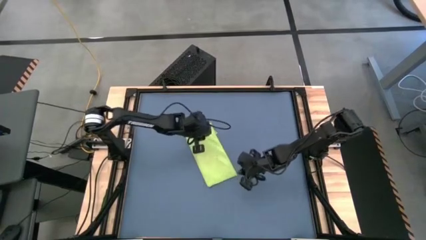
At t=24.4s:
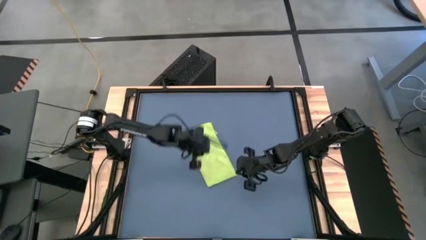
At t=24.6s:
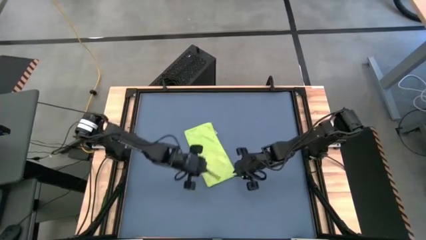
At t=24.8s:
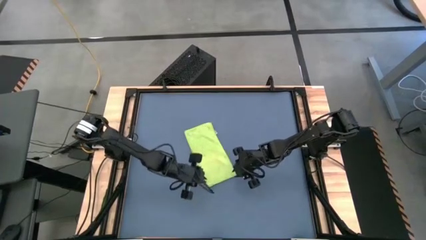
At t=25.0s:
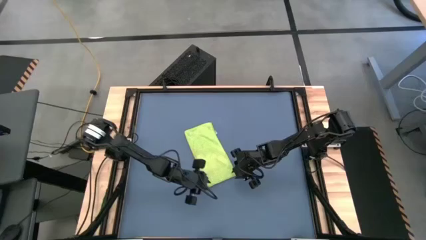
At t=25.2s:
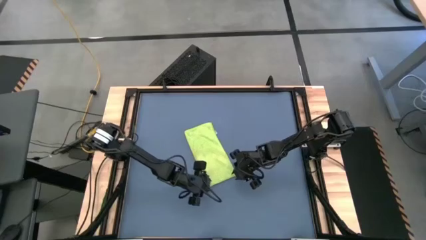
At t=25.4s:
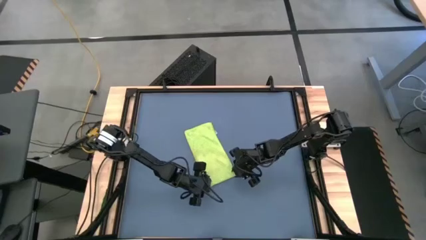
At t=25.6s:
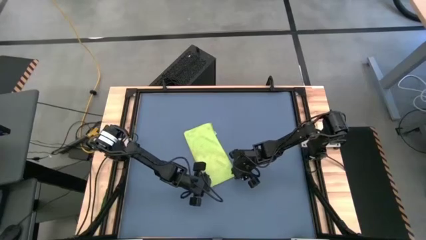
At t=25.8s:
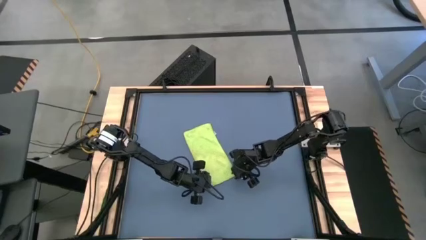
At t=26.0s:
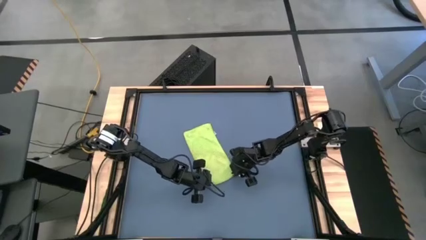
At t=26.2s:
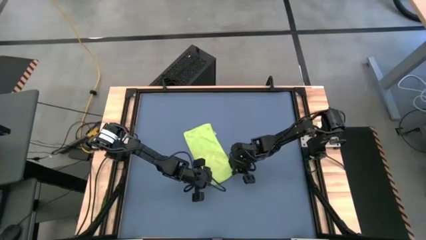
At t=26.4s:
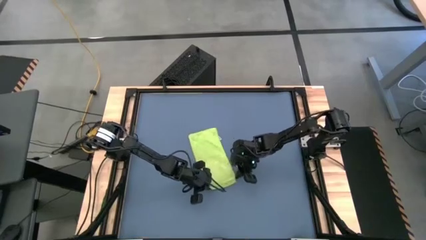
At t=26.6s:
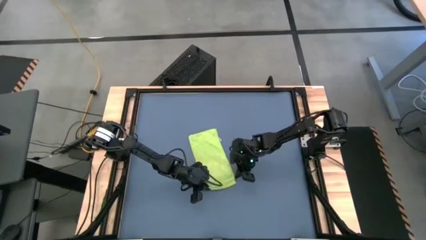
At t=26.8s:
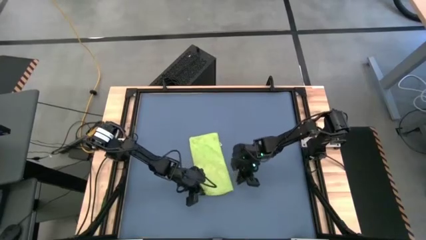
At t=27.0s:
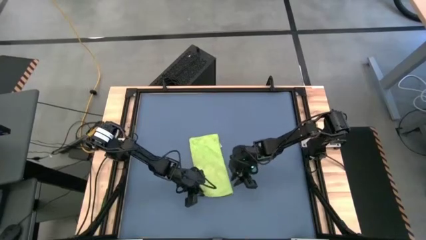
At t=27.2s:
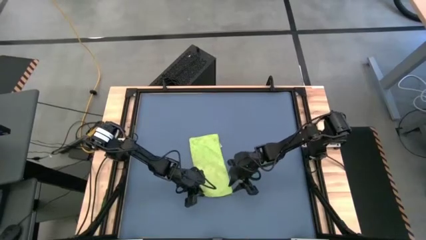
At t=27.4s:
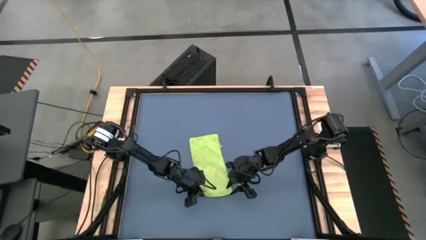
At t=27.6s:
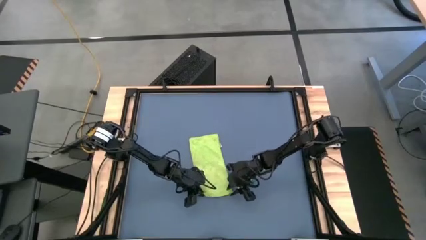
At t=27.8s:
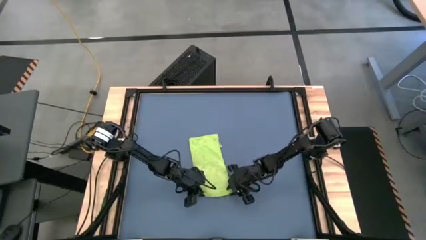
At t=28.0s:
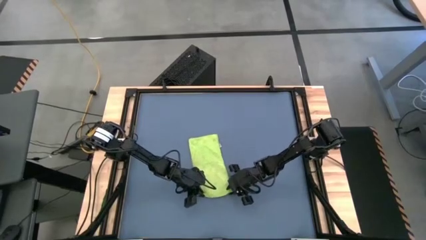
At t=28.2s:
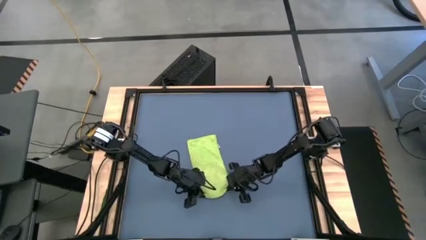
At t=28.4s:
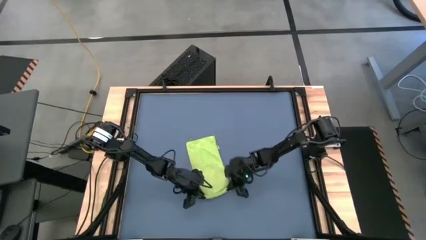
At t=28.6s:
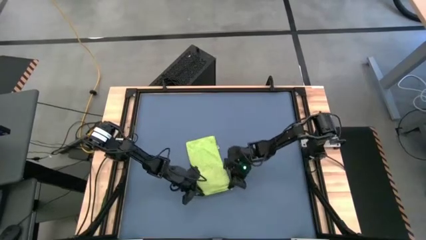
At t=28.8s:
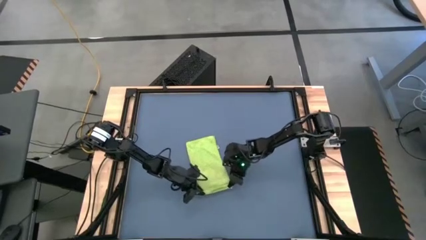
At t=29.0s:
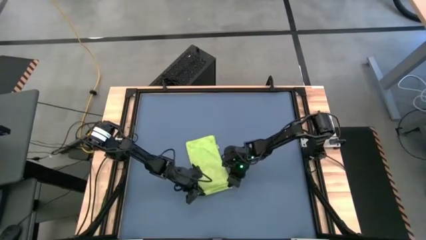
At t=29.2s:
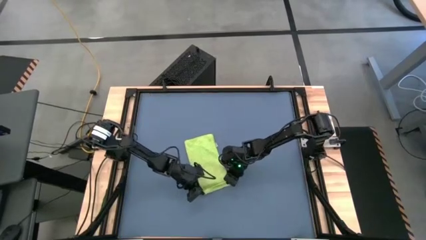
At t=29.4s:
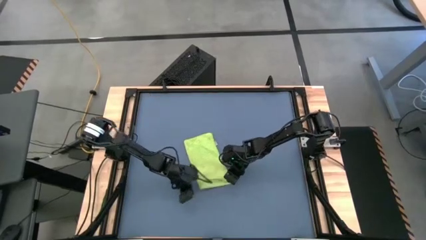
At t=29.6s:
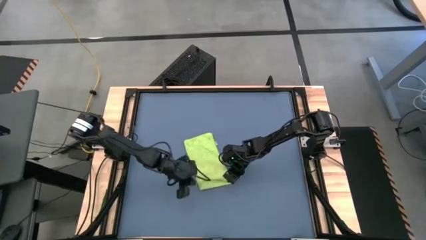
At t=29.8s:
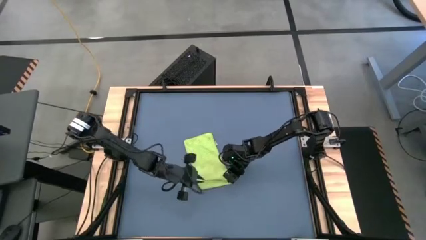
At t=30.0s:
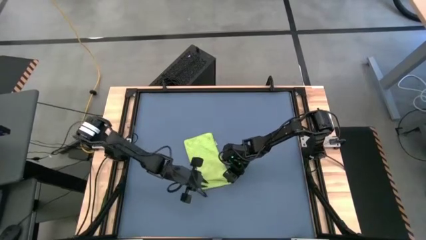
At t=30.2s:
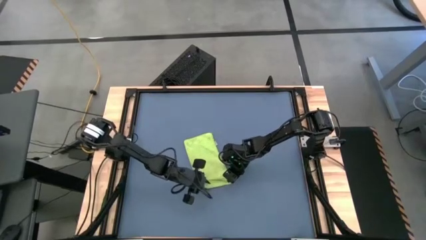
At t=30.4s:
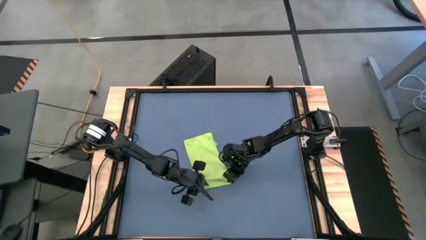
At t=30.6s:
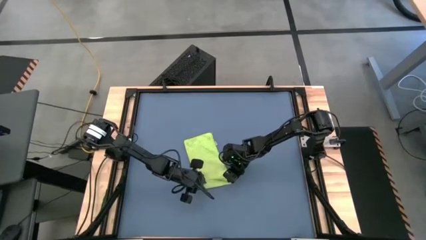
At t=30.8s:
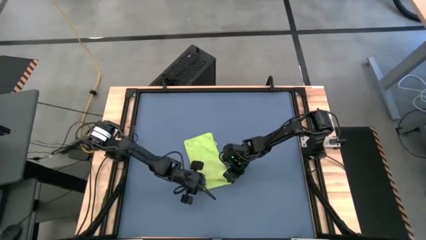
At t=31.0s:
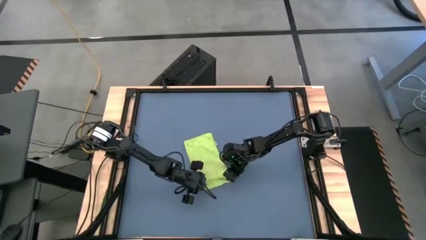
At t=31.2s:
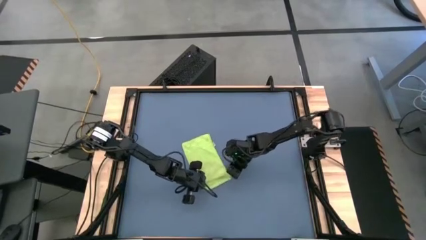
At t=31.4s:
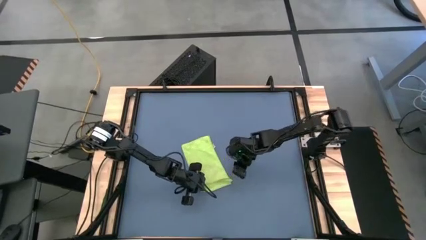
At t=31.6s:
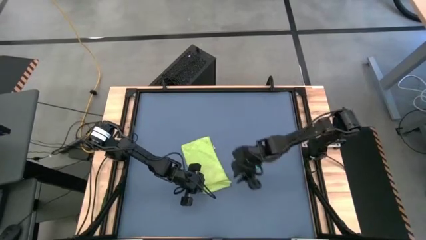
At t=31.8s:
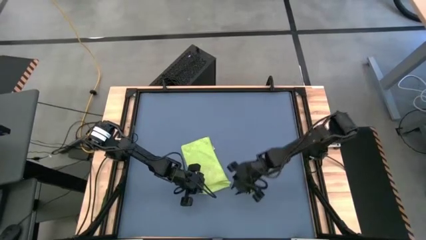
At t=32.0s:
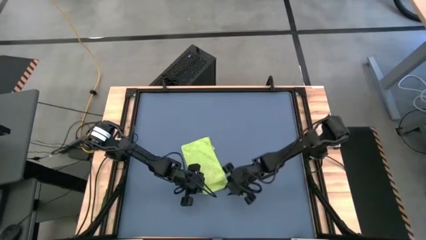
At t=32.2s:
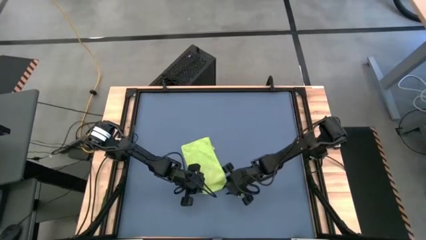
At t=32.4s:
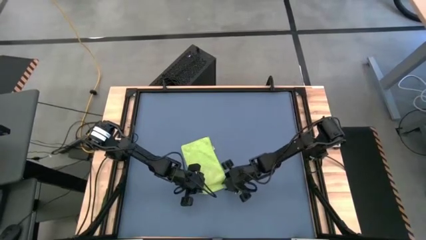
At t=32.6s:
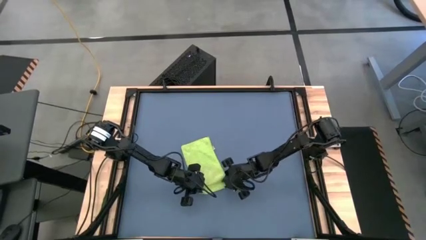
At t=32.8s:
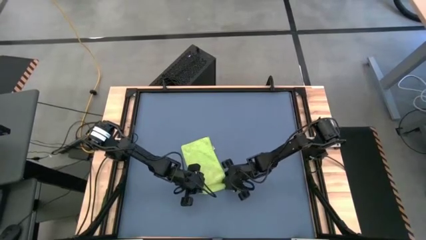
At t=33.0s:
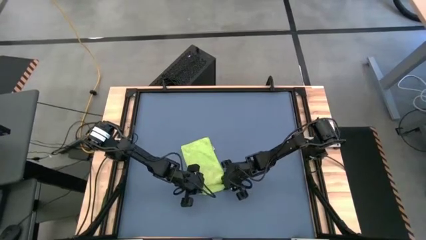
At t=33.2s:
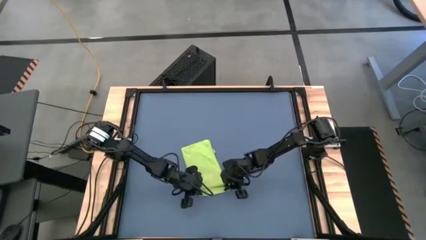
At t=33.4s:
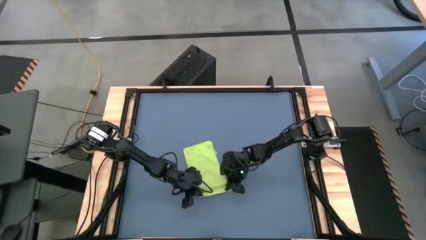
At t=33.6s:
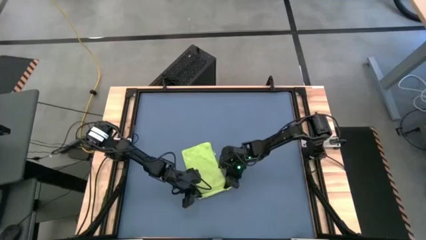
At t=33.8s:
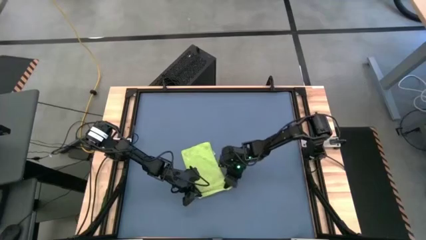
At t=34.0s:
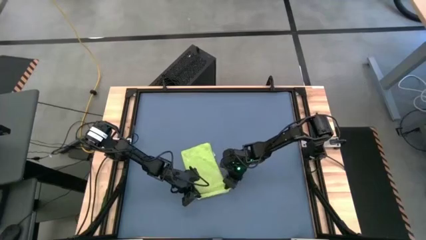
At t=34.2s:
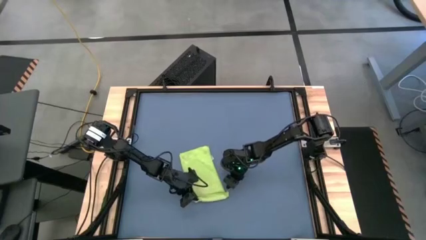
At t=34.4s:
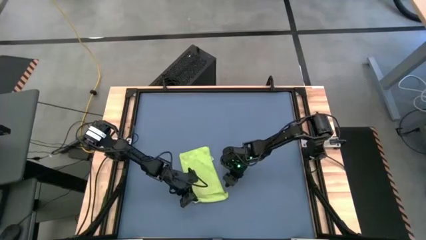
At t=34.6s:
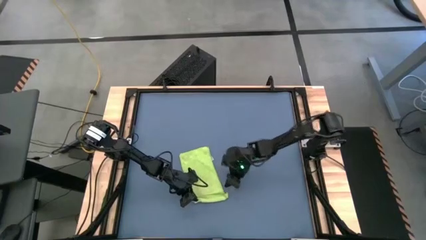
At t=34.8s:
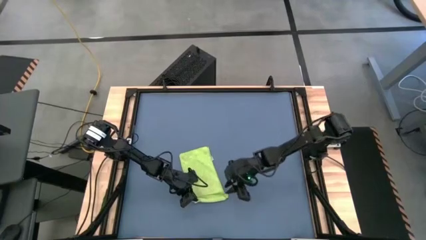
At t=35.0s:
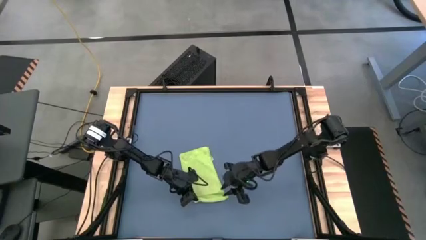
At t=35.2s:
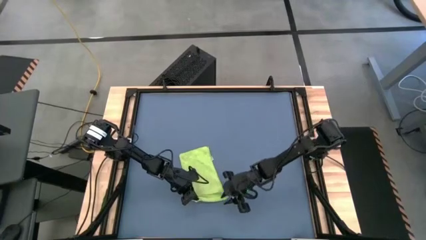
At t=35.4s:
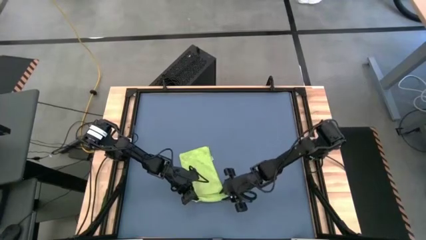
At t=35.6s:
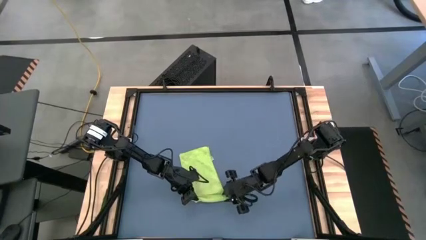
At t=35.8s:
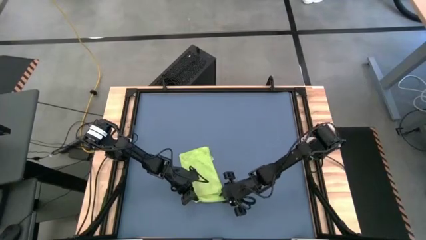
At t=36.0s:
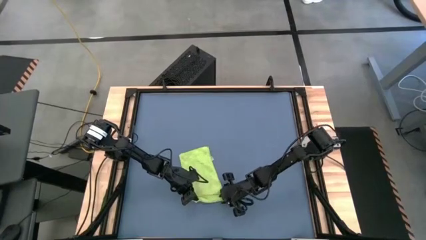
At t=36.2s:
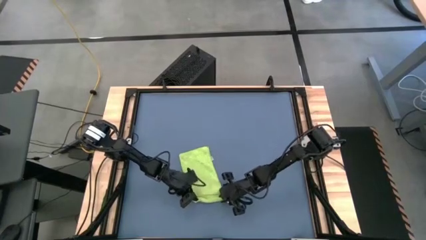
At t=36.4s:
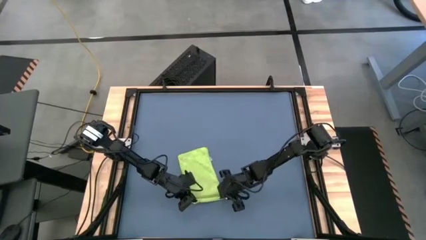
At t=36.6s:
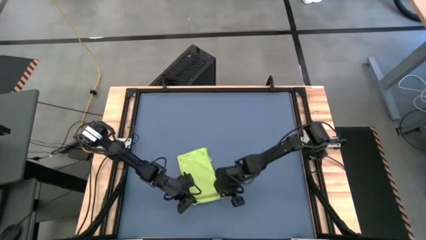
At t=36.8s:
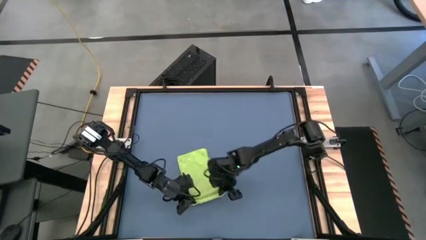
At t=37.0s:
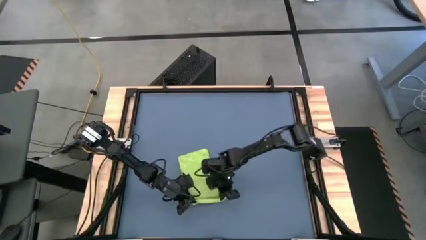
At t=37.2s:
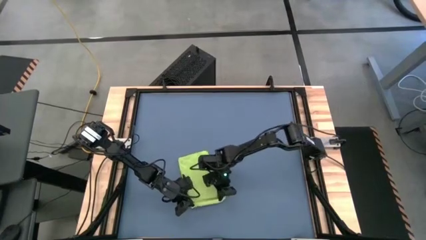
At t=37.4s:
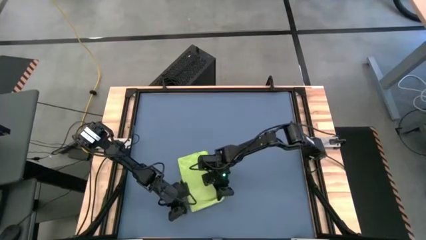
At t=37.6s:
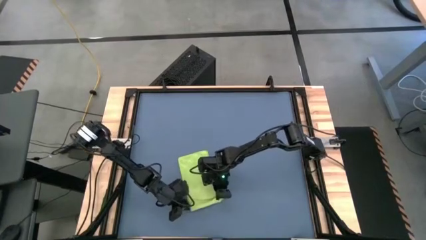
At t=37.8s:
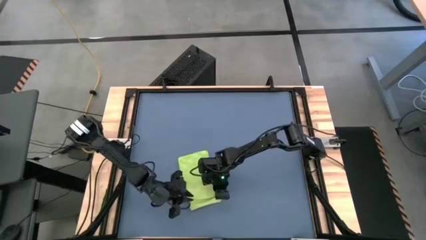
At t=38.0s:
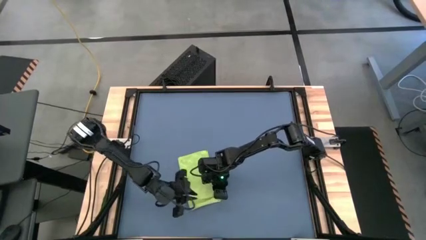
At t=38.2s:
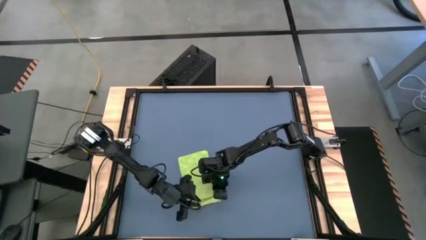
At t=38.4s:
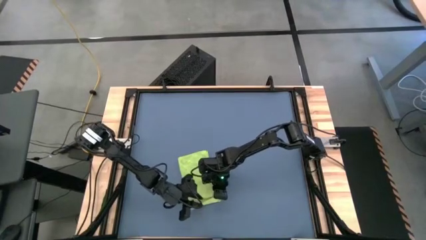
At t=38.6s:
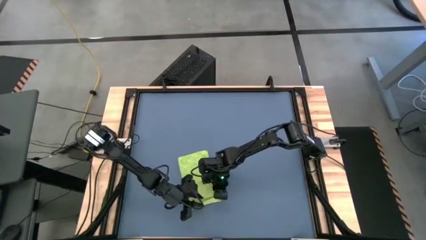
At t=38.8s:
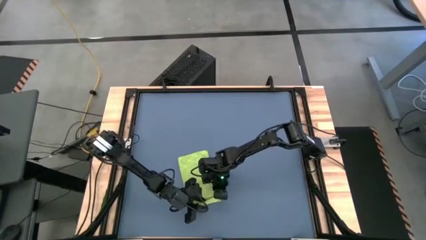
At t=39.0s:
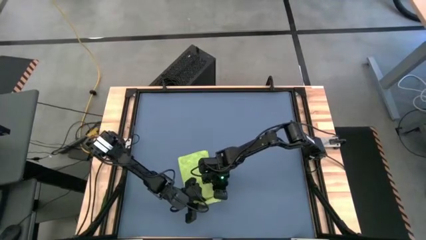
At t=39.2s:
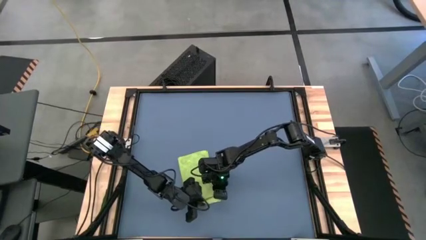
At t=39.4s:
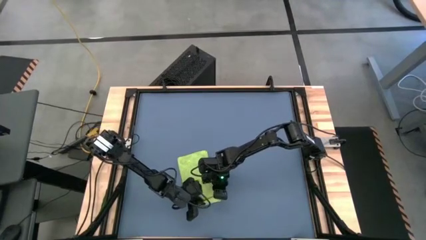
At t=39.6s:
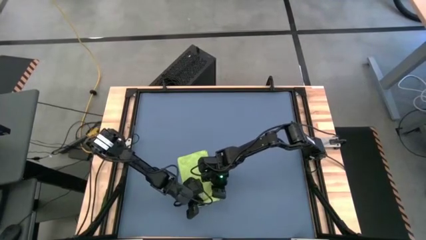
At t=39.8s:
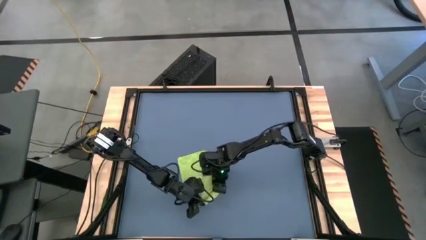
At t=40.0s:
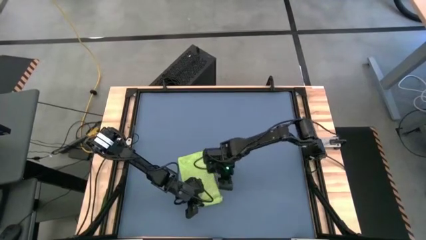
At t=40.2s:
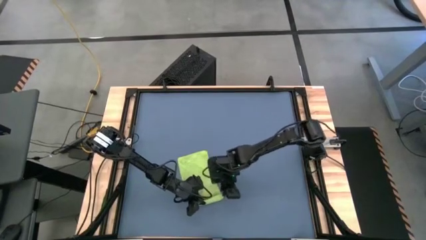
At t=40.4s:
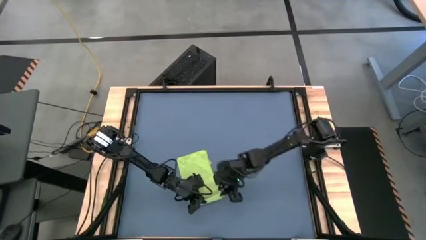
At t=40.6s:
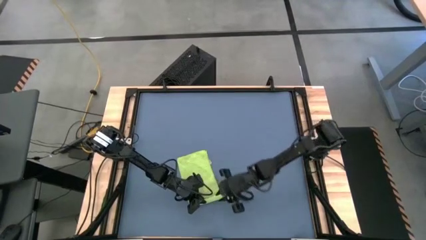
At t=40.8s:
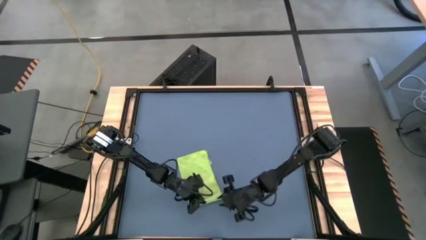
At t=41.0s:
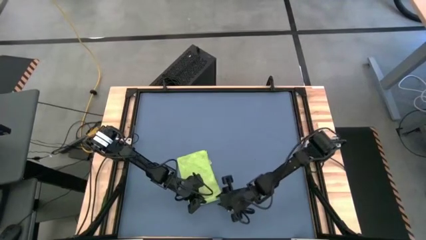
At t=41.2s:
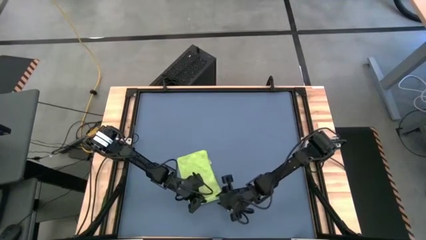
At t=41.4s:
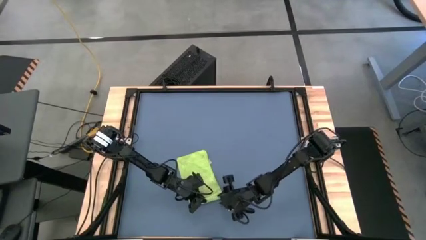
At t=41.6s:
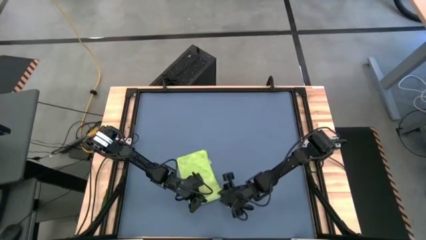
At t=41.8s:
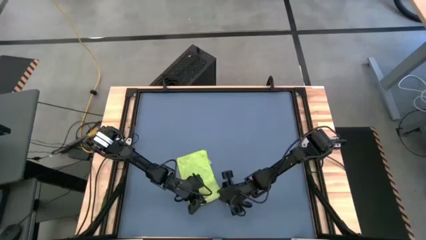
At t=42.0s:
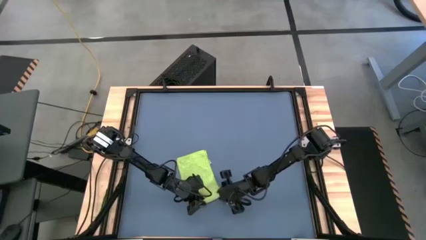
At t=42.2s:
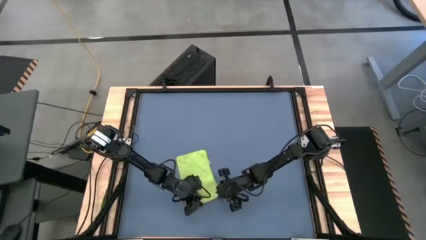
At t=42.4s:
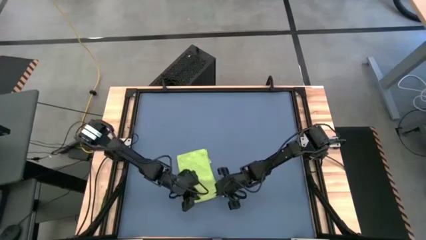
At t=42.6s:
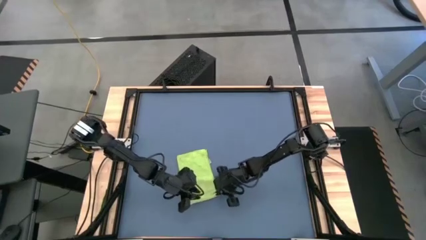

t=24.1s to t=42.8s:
Task: Roll towel
Roll the green towel
